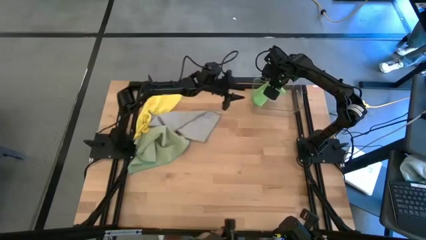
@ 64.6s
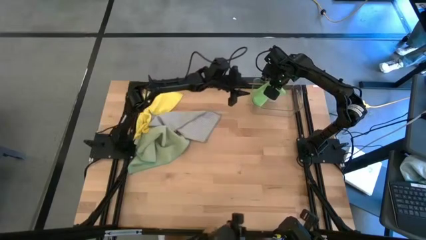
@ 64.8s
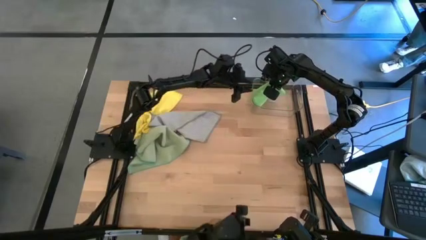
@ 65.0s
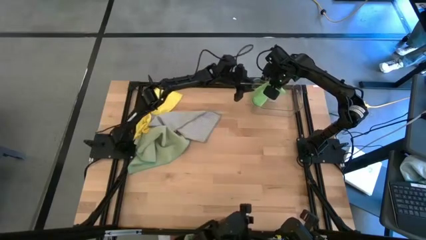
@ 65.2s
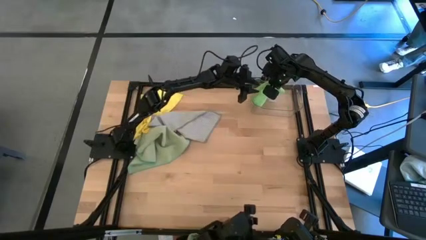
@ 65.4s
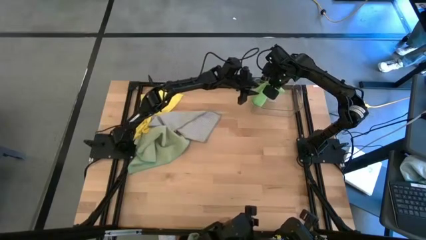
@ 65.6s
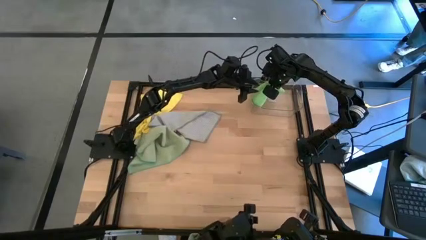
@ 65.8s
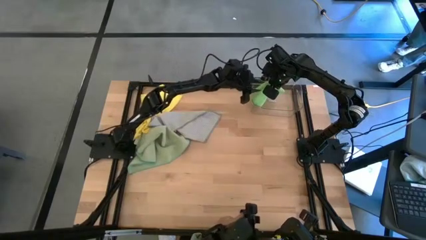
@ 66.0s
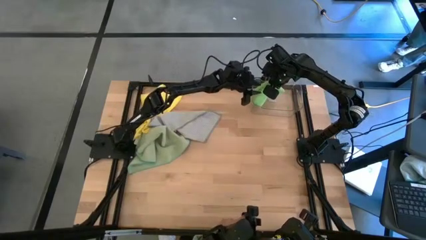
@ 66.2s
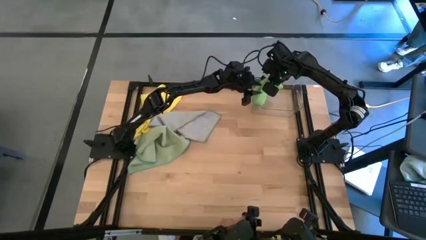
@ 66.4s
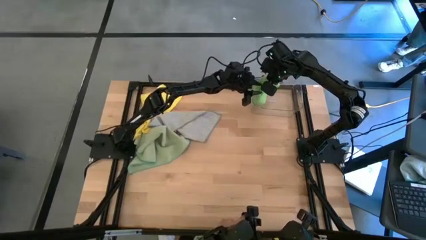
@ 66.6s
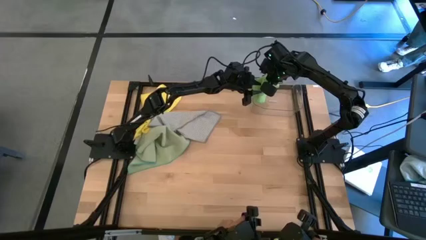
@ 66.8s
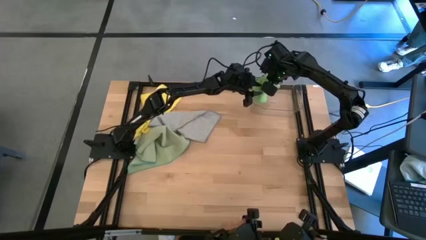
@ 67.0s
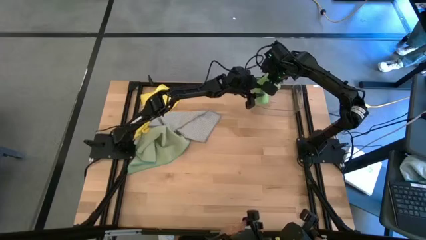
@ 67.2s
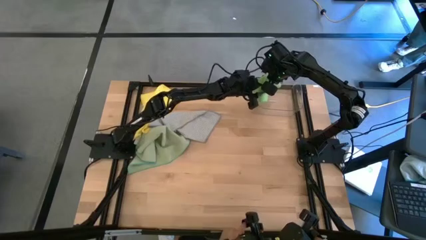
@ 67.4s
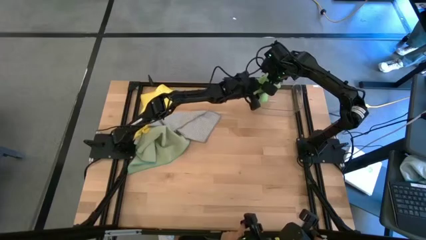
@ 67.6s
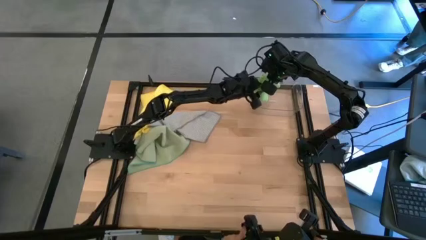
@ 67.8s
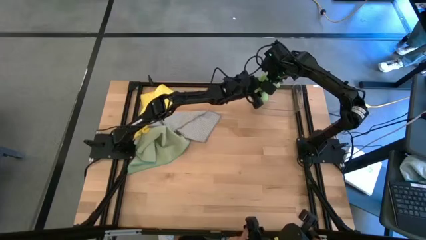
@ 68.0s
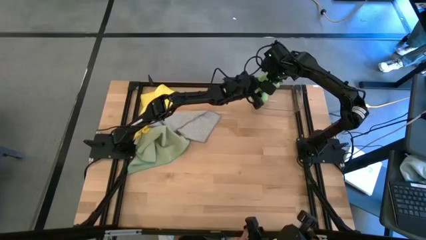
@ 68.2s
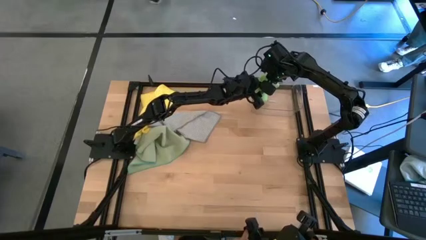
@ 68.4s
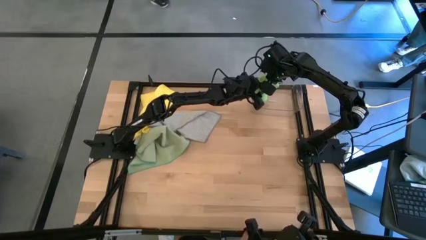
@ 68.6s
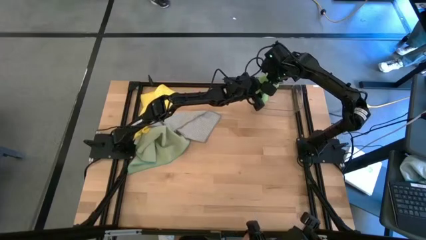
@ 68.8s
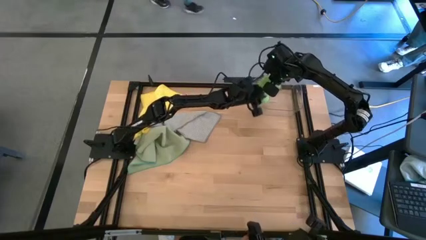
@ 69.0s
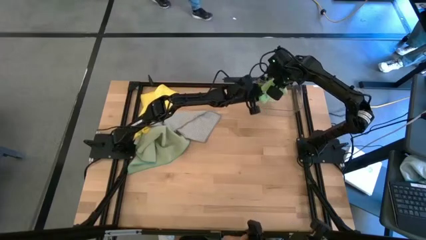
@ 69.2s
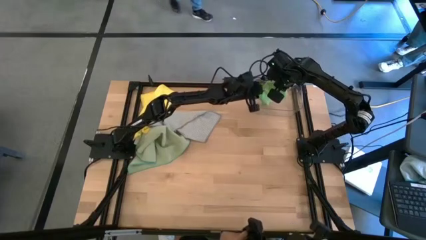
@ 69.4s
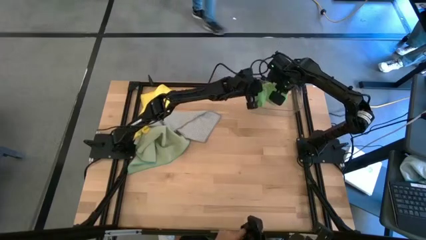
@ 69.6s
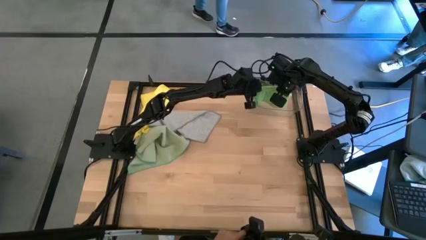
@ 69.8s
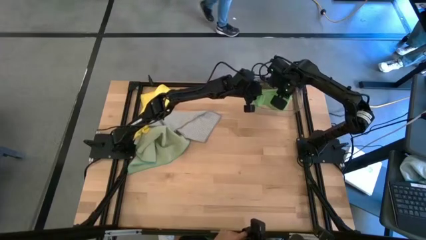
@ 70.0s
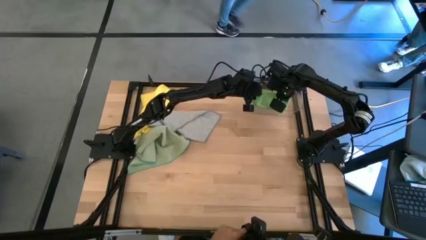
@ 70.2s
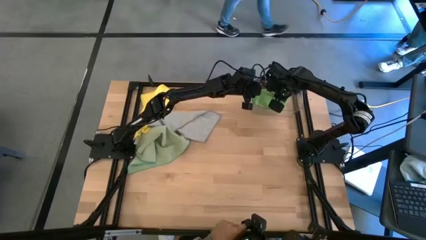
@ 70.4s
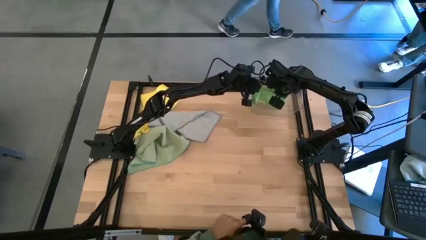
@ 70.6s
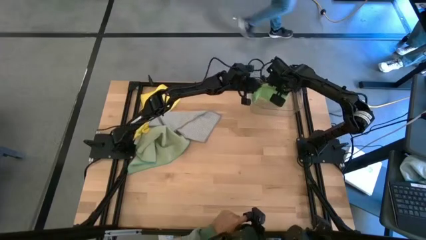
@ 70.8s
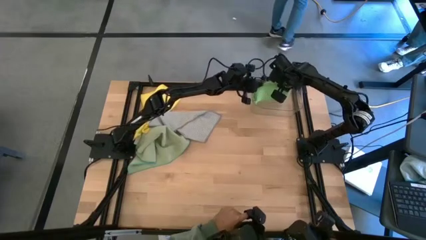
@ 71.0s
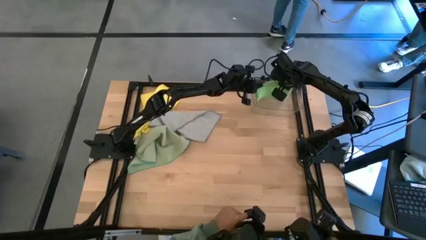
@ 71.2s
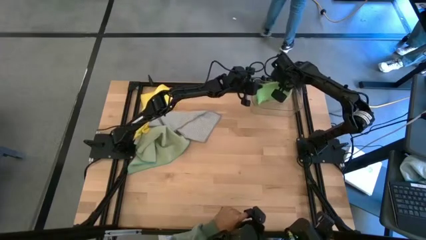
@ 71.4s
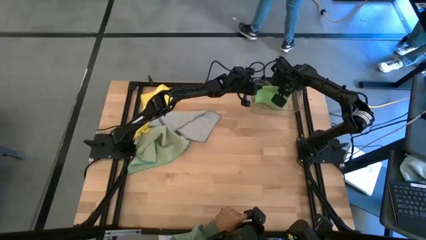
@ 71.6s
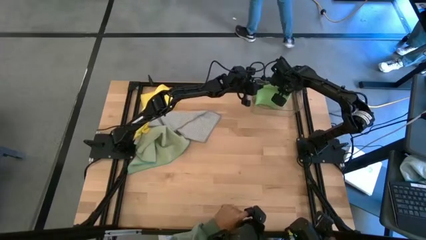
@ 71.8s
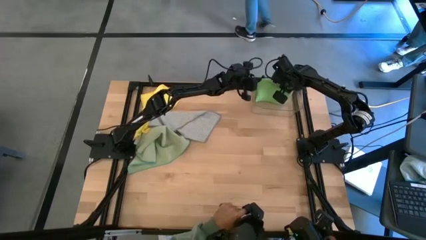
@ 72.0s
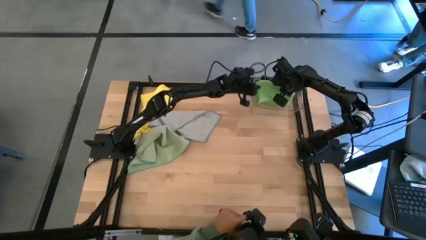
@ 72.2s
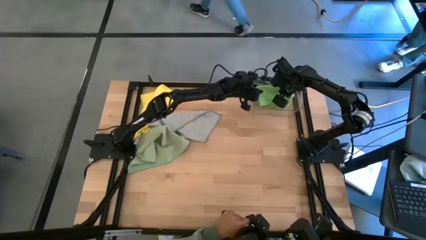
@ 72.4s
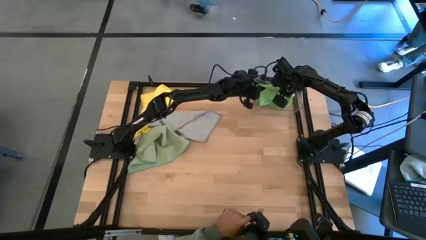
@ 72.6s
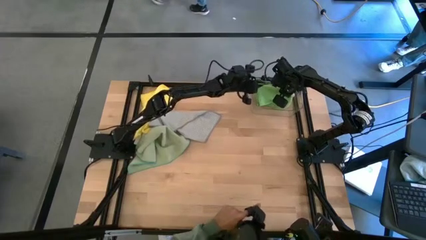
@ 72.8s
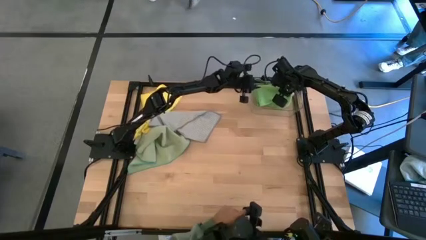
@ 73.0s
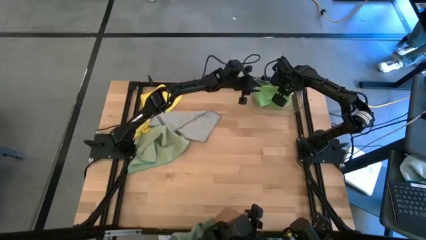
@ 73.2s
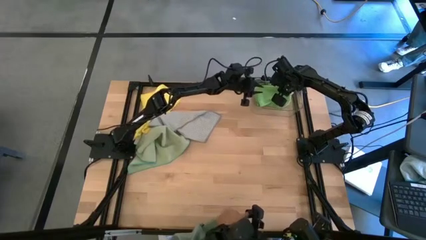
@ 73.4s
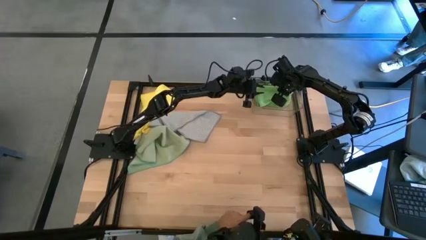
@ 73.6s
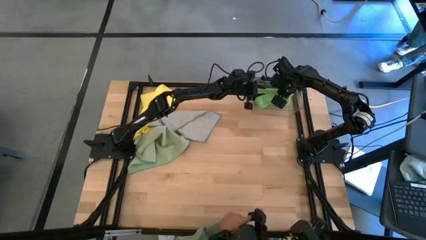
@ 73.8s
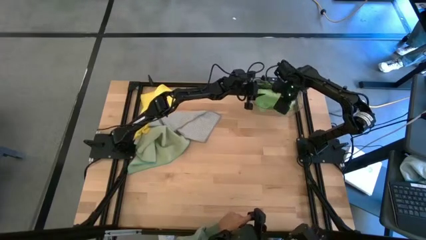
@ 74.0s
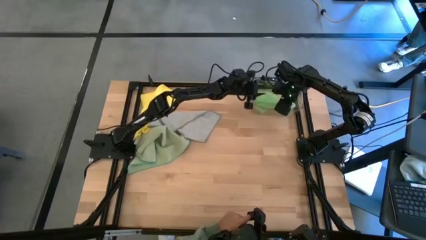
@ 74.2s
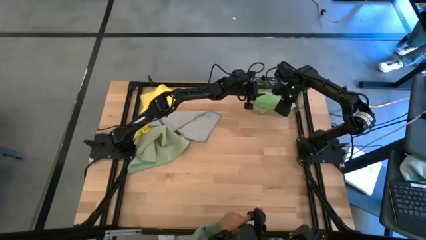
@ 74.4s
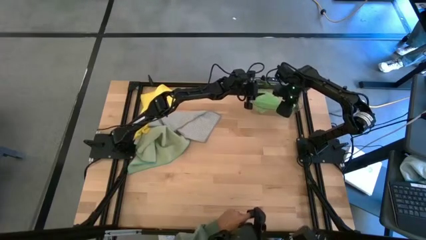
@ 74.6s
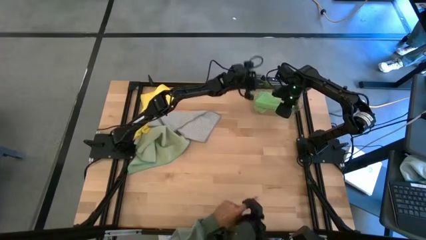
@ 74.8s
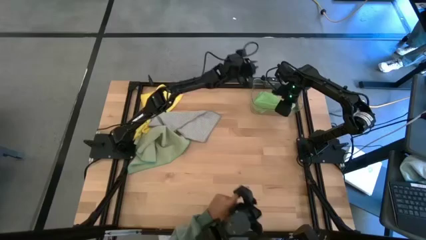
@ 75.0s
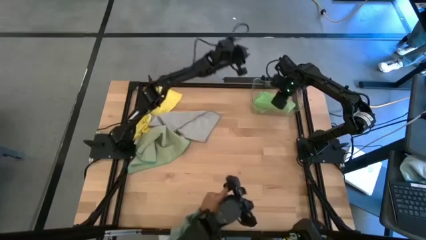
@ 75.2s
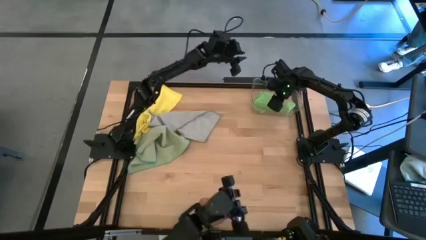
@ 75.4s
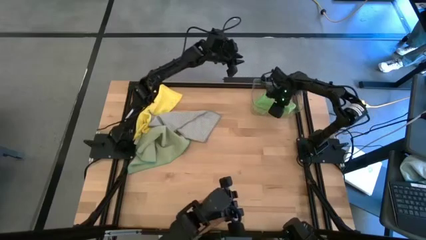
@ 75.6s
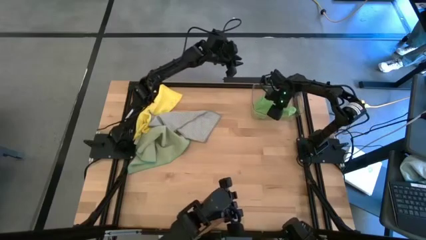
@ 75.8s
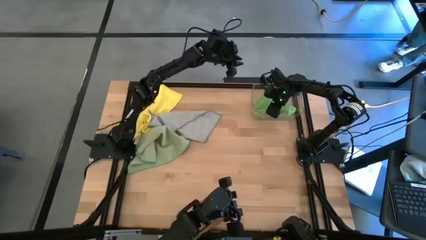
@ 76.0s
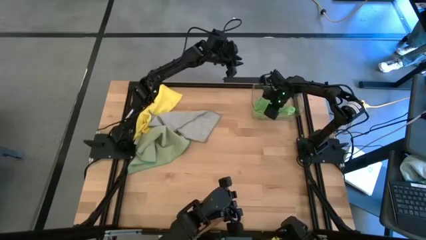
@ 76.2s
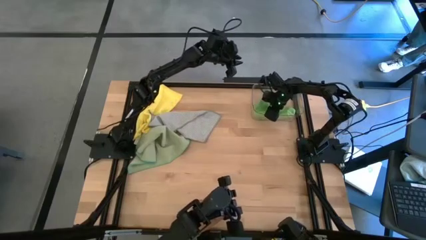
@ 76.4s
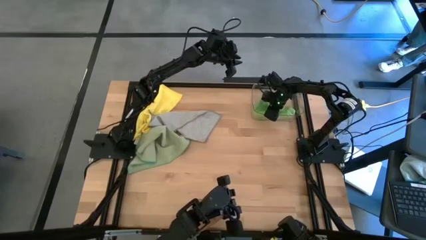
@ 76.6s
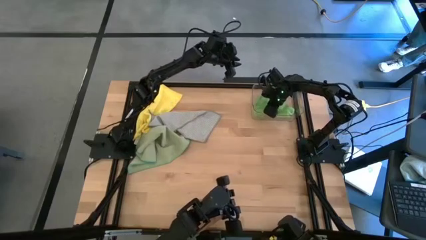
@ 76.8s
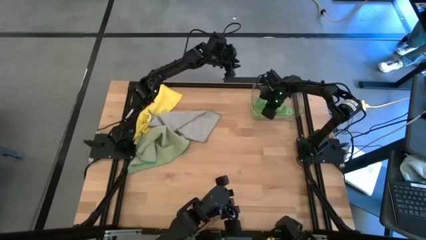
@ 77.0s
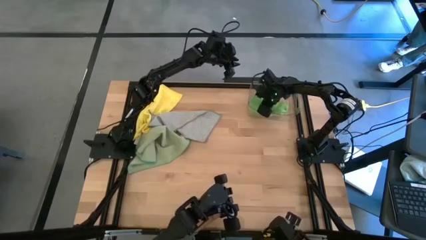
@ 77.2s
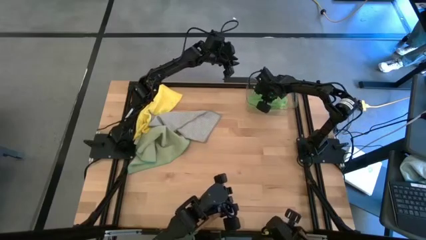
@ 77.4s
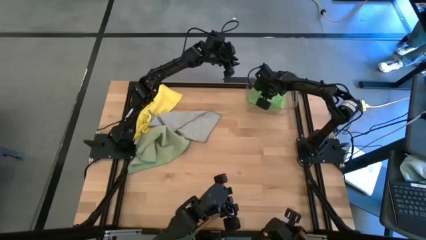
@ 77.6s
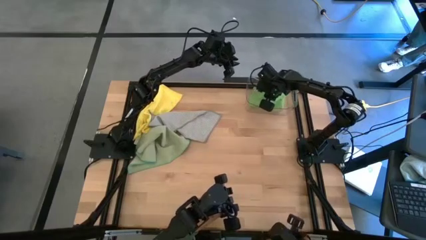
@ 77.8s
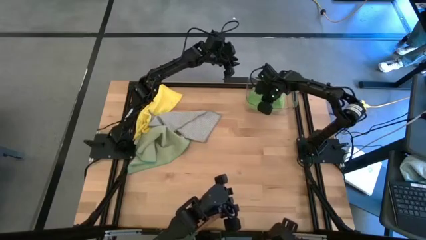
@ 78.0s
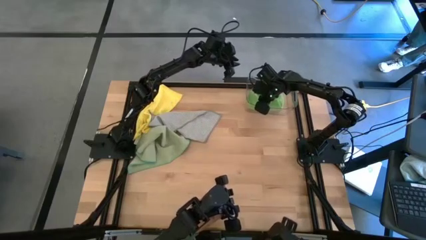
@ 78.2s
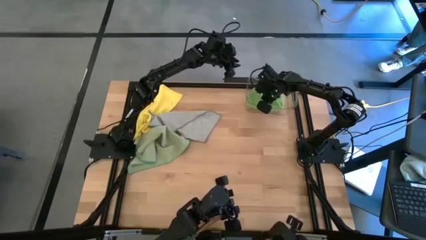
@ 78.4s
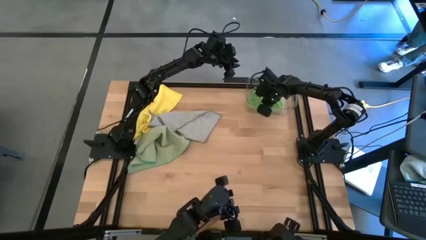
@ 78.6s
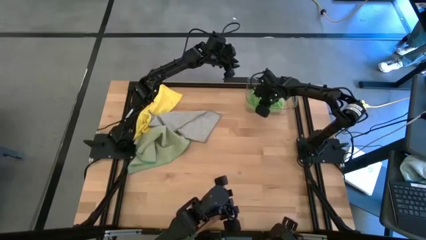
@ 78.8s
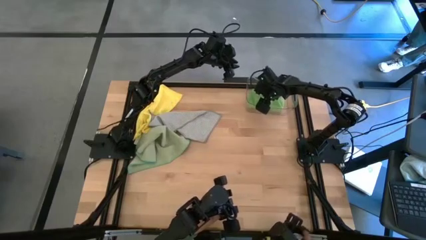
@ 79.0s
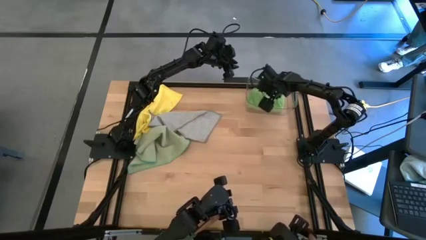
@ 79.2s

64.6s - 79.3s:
Task: Fold microfiber towels
Put the green cloth into the transparent bin
